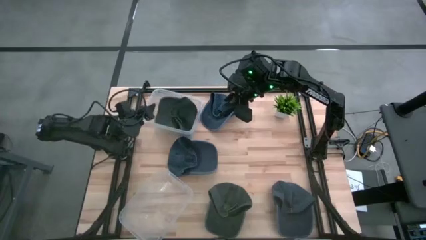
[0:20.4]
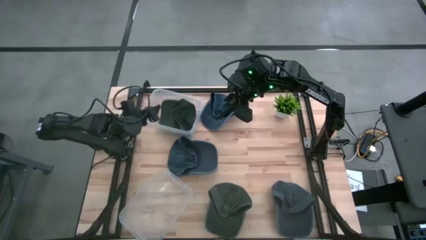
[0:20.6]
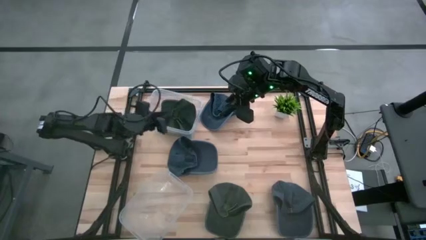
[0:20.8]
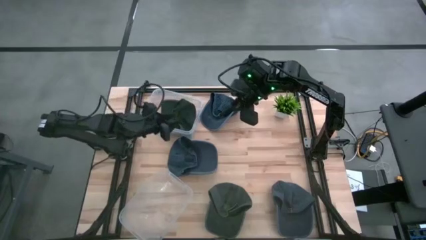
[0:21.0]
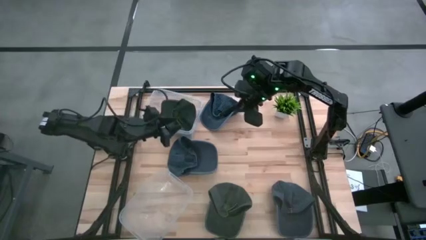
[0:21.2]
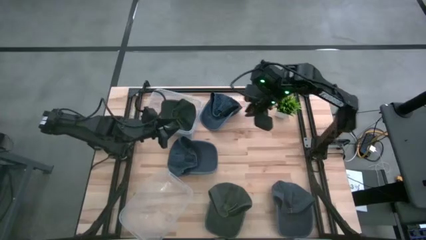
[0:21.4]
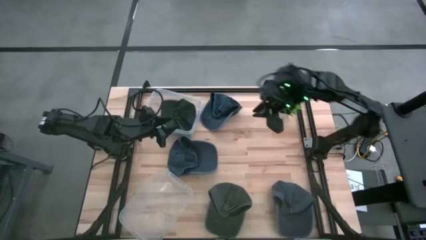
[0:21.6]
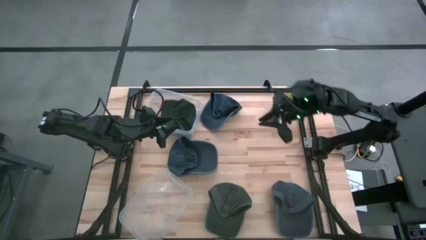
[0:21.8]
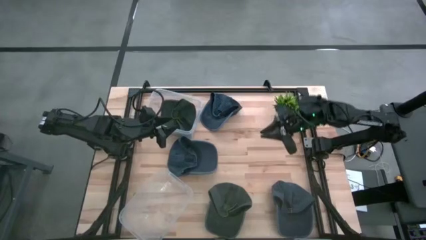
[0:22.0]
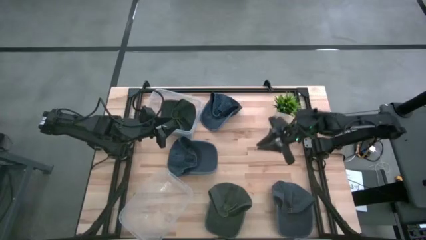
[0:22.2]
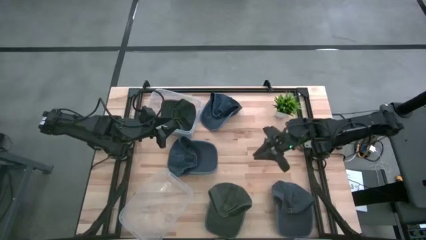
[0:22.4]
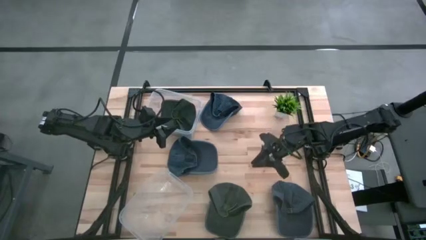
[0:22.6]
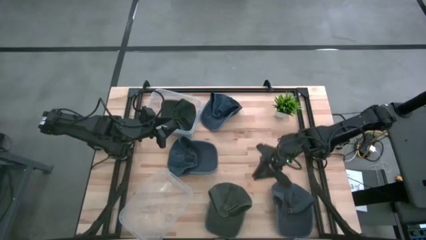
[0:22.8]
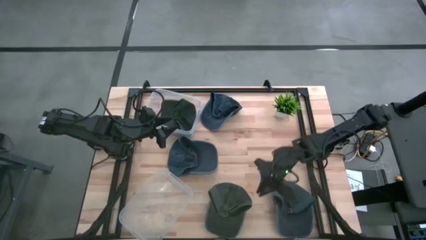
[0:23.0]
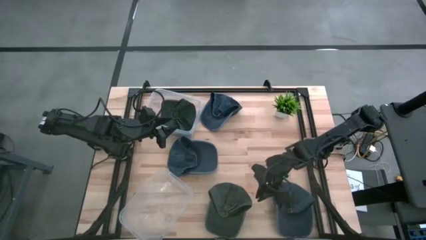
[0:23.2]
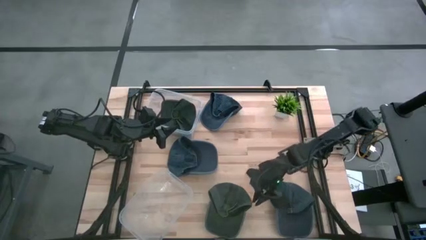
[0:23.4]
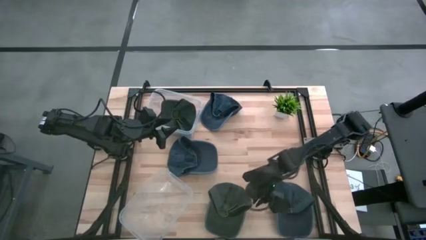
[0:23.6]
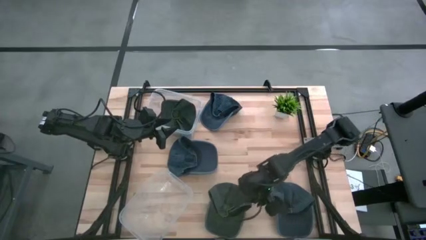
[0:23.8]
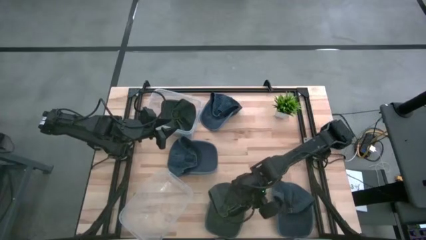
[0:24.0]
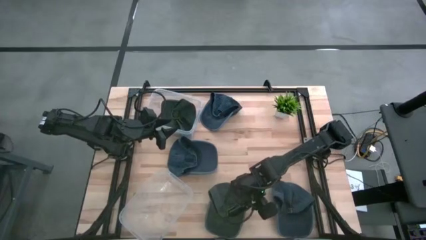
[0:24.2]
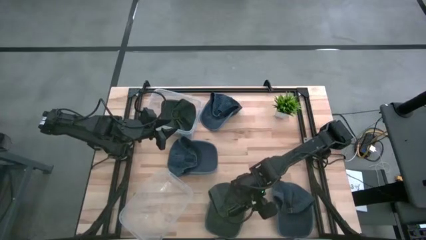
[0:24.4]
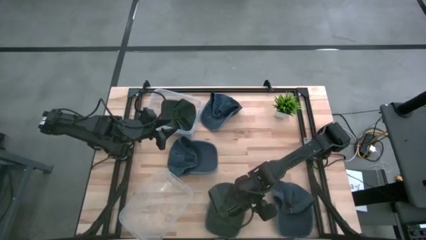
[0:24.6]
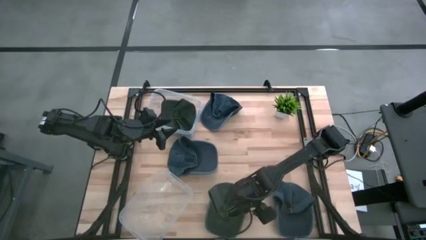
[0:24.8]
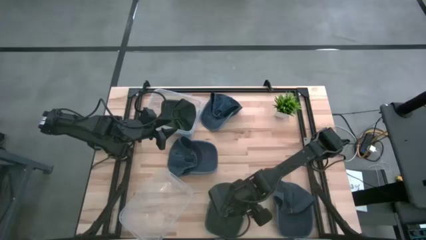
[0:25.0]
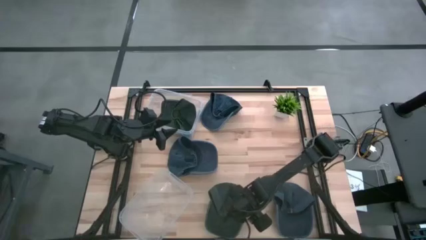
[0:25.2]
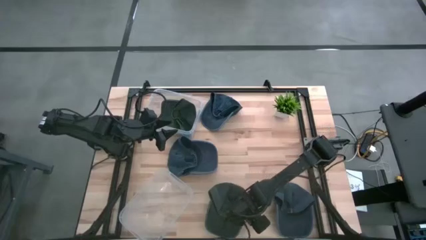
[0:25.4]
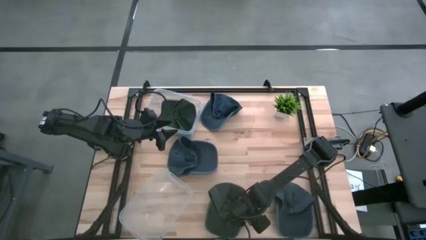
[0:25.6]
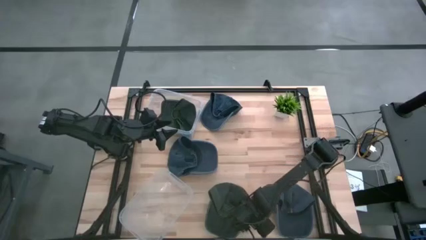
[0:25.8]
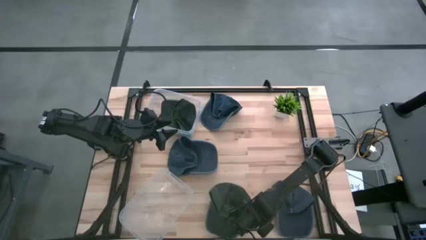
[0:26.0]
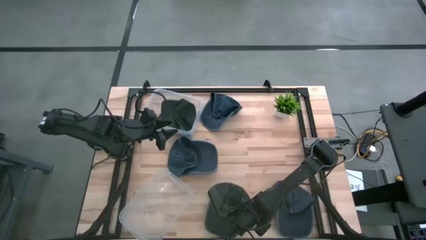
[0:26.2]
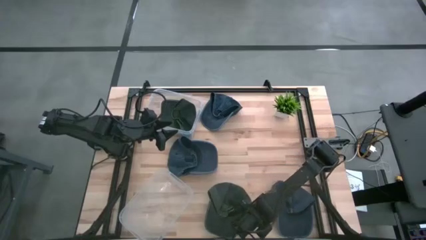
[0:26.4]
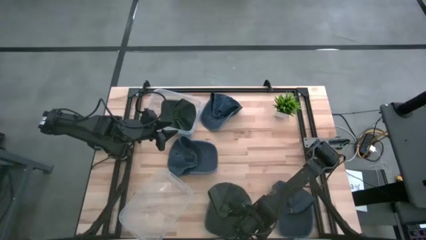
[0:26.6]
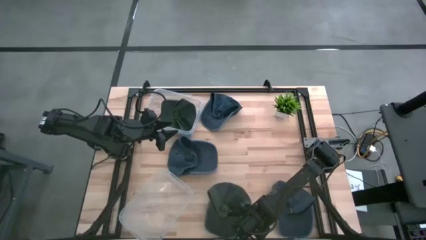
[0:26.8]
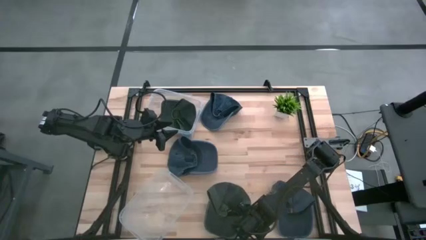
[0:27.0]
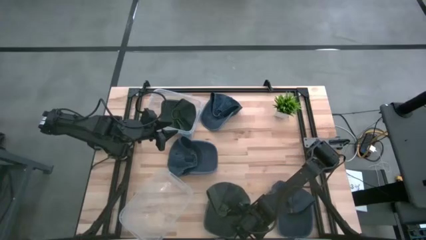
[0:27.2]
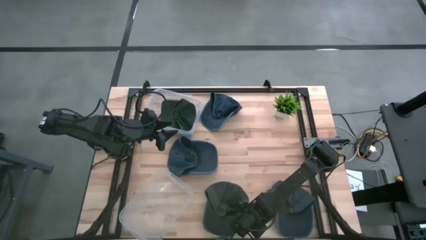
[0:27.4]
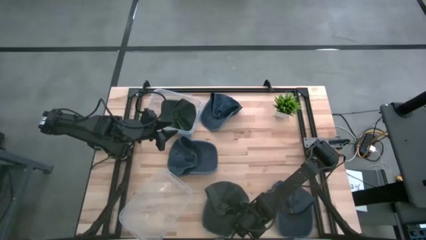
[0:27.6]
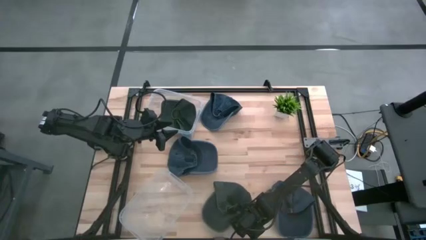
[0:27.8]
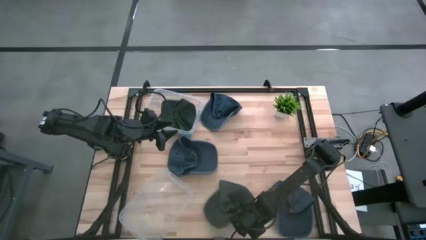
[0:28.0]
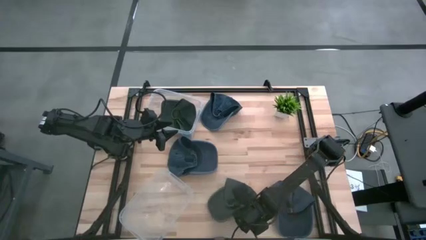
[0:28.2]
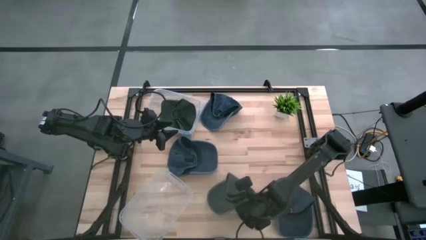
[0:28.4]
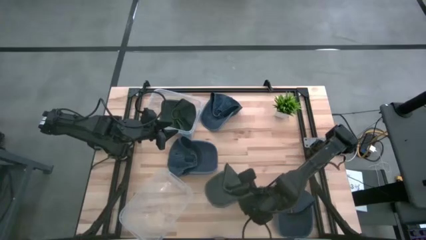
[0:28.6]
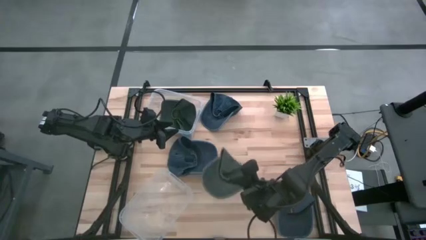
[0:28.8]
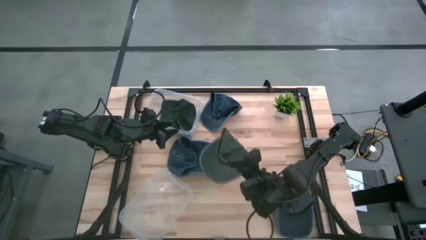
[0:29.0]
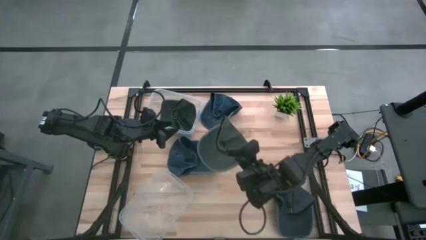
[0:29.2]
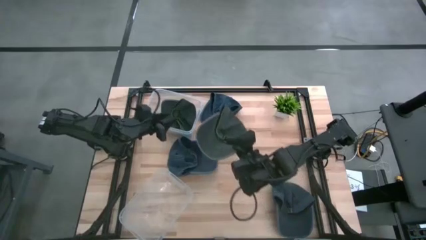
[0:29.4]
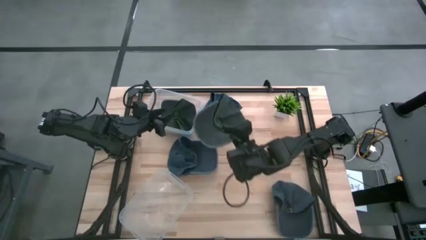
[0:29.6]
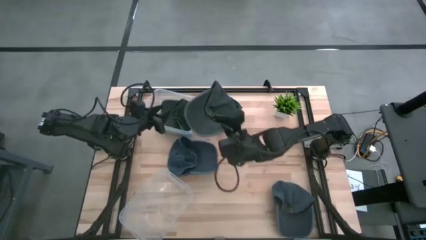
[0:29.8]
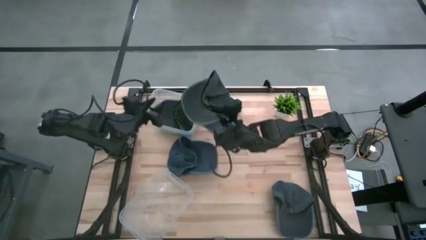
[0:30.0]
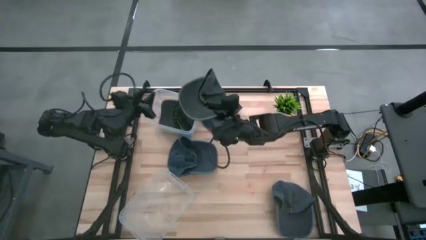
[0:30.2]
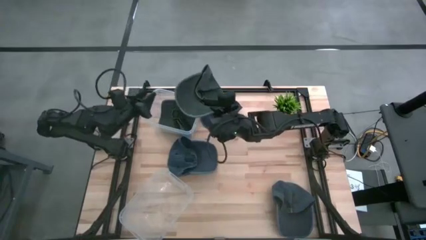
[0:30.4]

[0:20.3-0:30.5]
Task: Pick & Place hat
Put the gray cap into the top transparent bin
